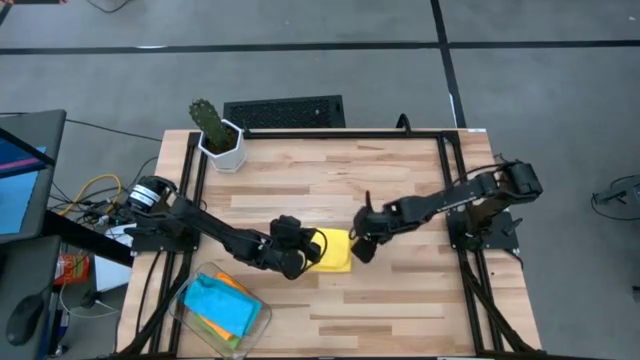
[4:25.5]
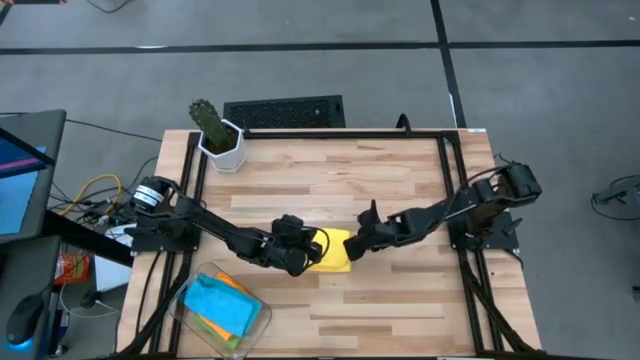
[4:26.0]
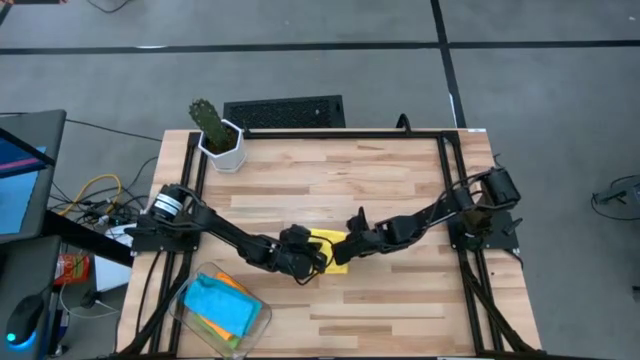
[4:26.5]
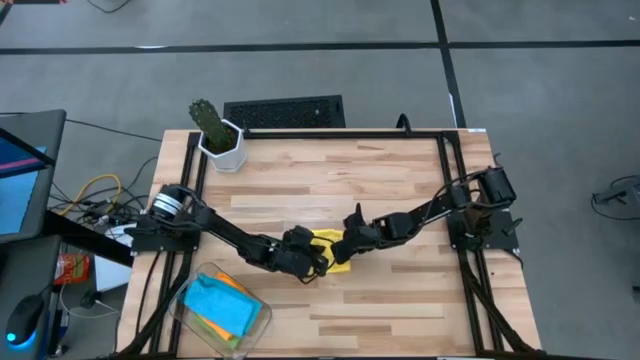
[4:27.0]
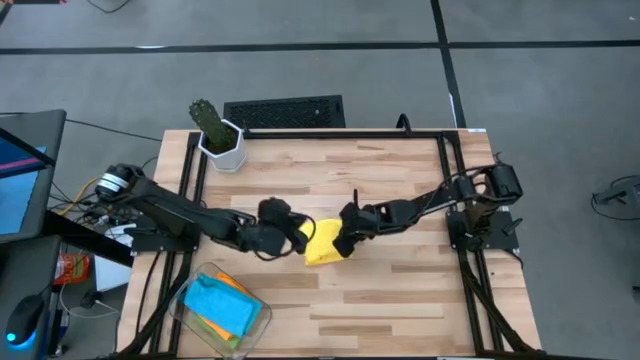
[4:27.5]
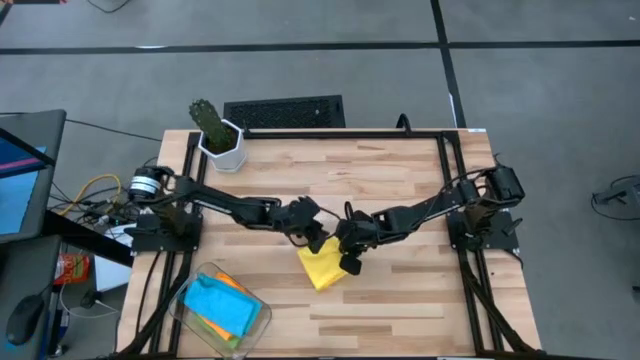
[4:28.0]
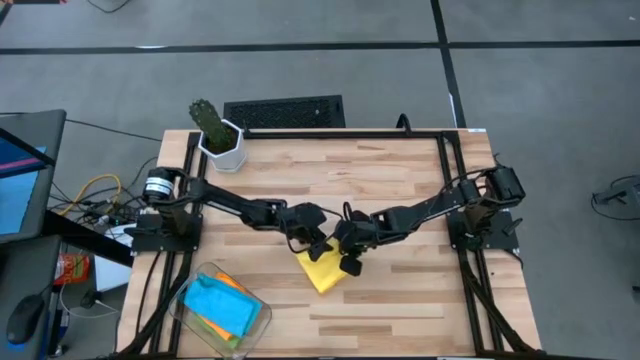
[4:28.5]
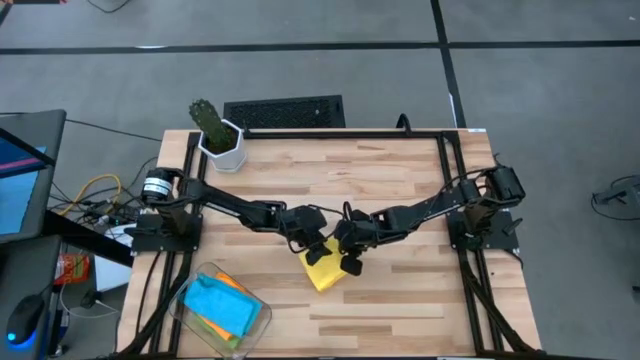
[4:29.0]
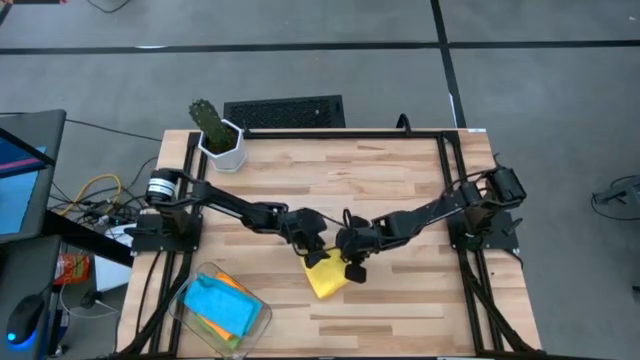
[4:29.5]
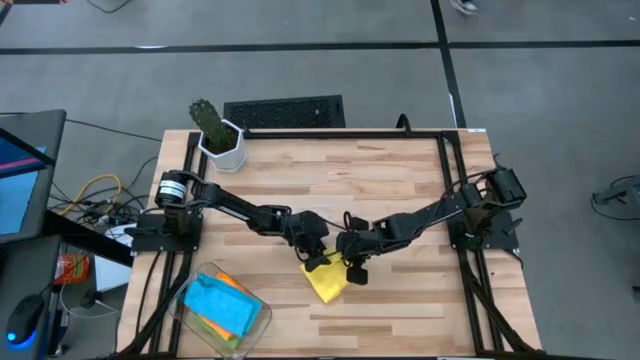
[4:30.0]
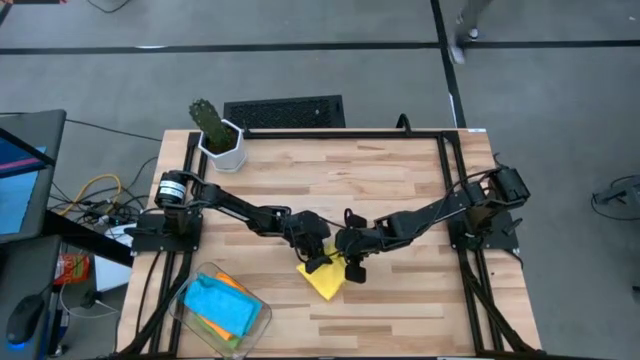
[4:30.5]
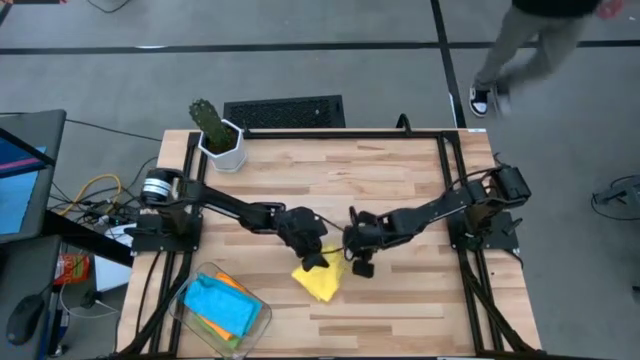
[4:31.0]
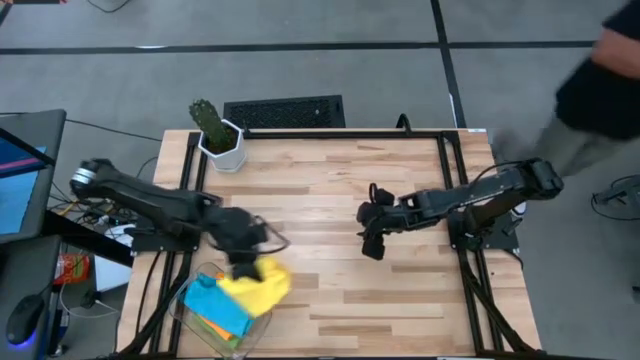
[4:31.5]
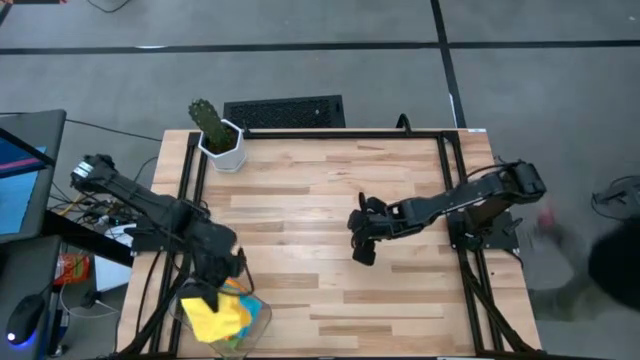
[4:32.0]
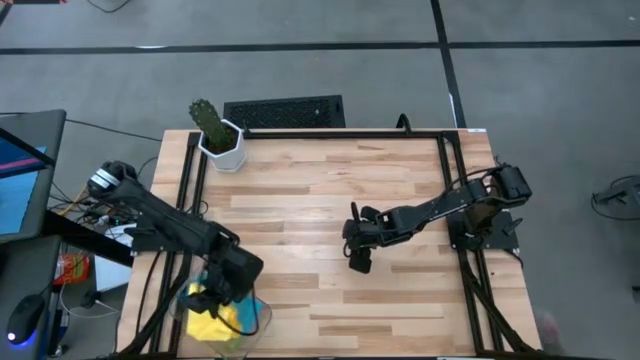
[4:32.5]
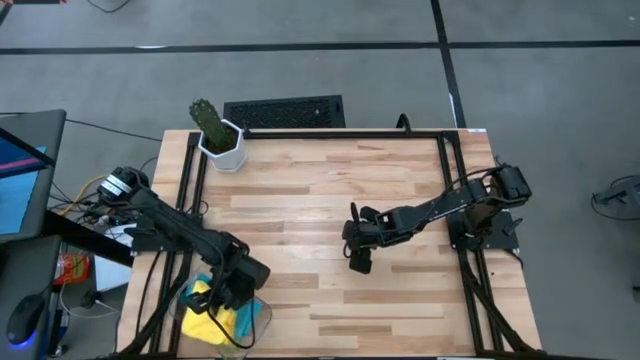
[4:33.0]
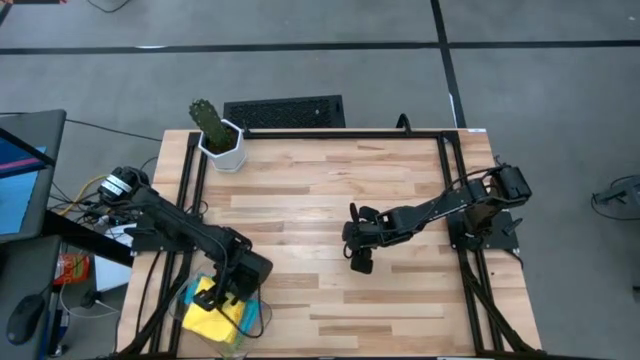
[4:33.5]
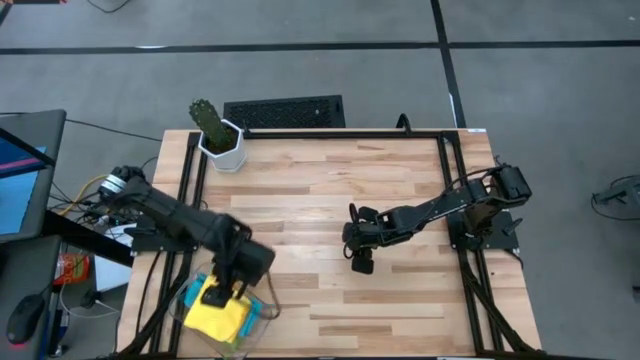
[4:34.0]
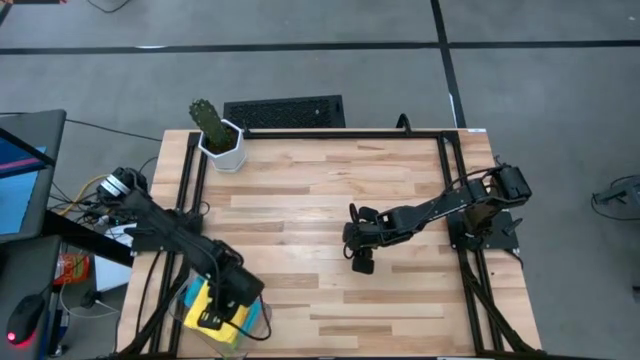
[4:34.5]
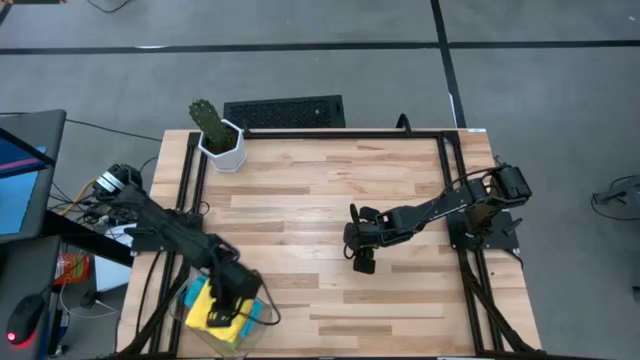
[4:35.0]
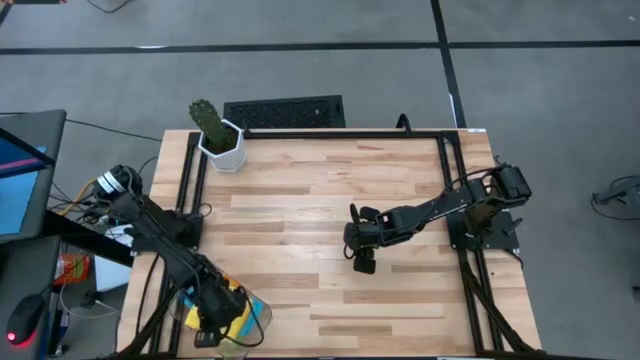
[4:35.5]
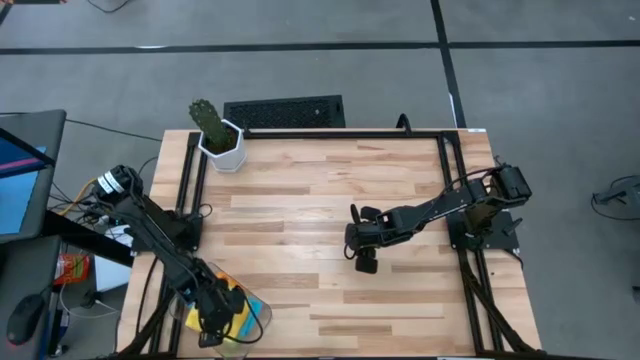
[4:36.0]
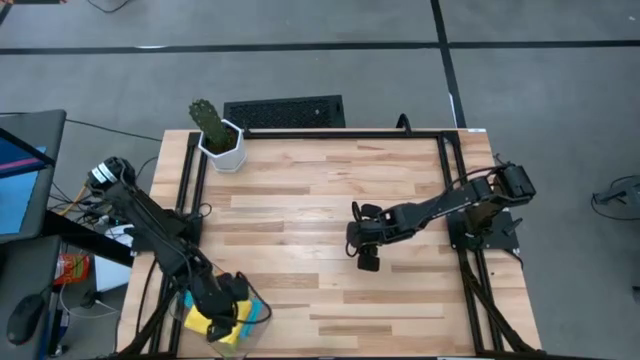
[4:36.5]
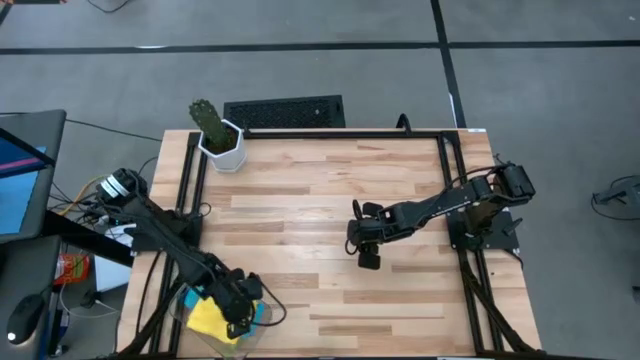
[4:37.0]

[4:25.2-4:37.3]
Task: Fold microfiber towels
Put the yellow microfiber towel into the transparent bin

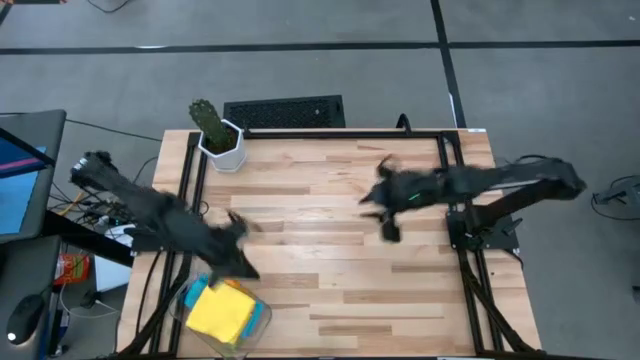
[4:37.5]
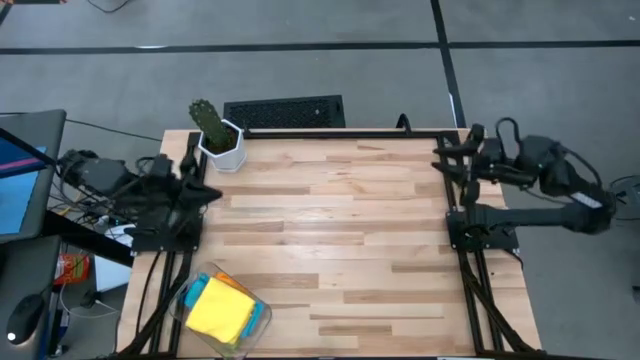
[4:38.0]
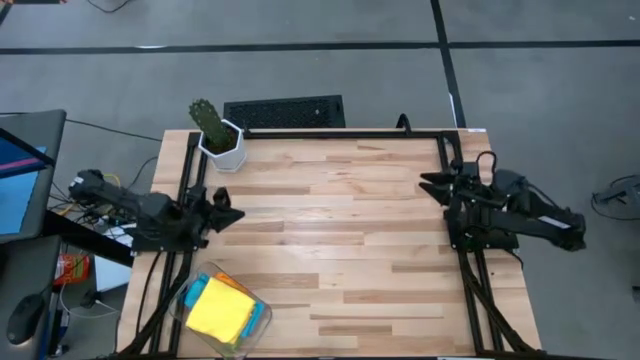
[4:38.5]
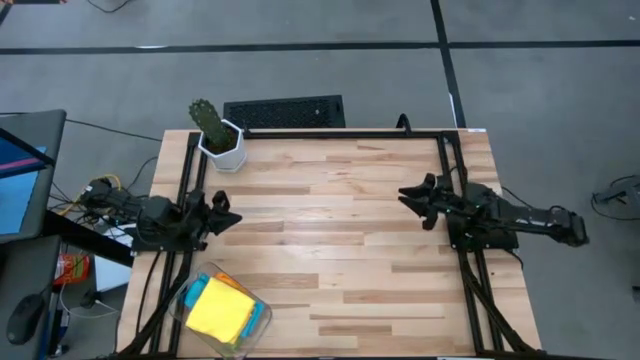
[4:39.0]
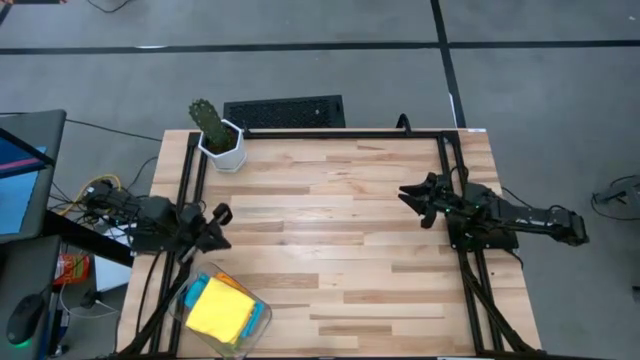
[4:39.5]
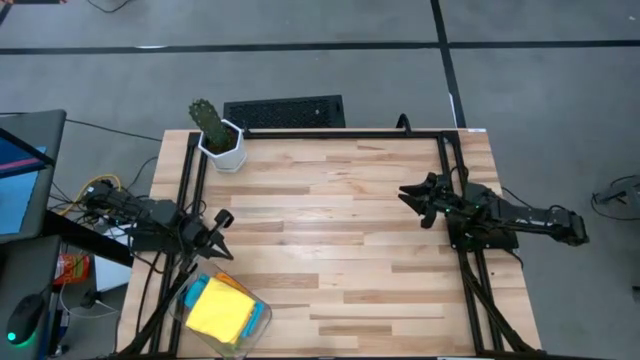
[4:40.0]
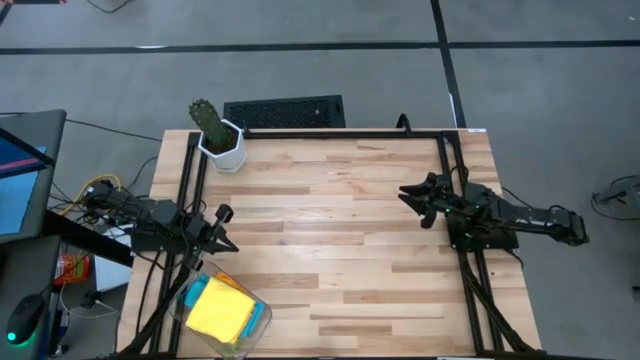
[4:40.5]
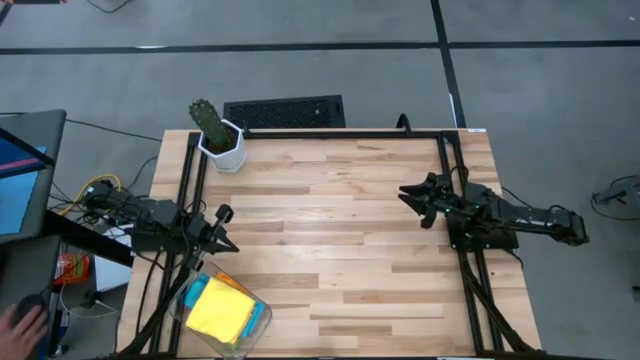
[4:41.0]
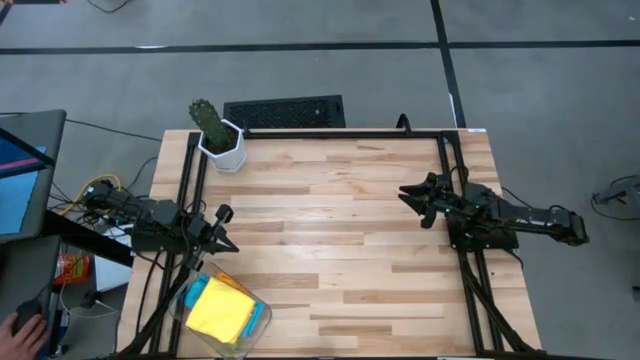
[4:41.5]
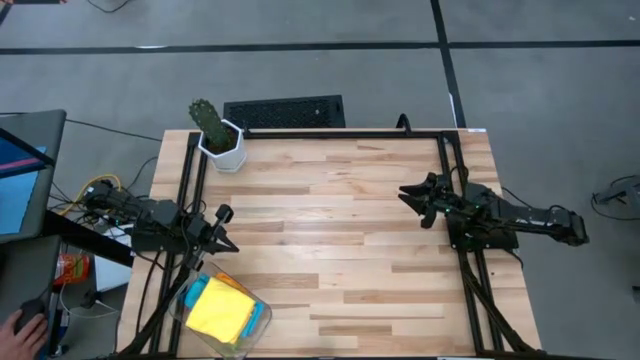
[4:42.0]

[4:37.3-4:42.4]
Return to Home Position

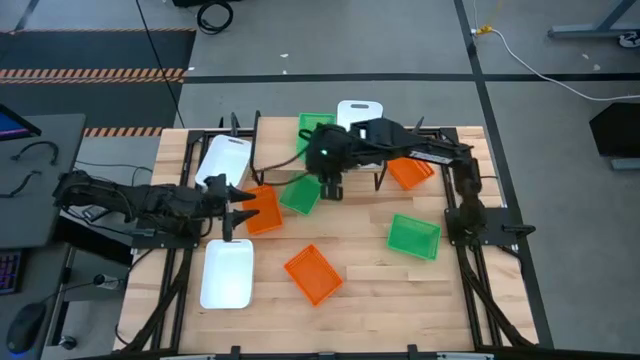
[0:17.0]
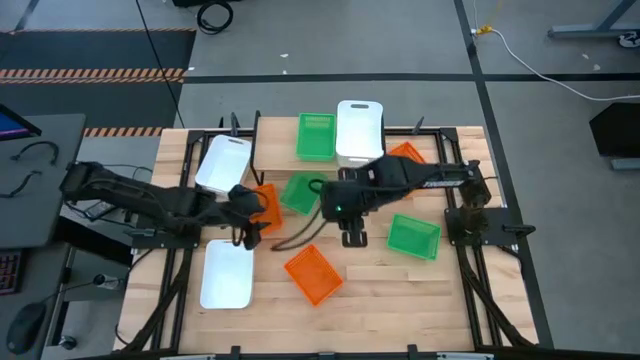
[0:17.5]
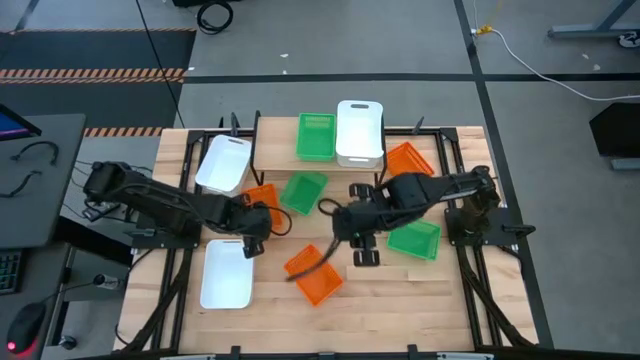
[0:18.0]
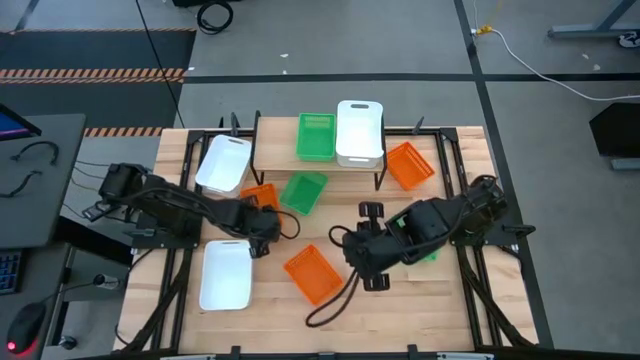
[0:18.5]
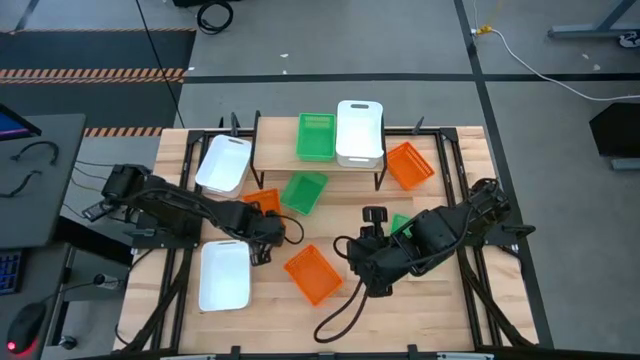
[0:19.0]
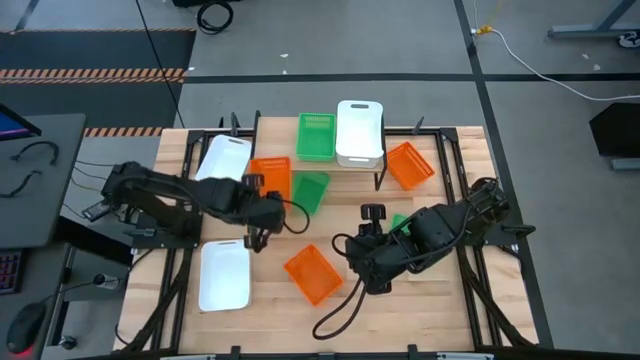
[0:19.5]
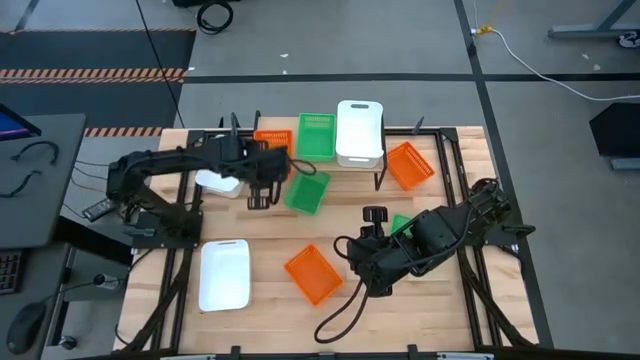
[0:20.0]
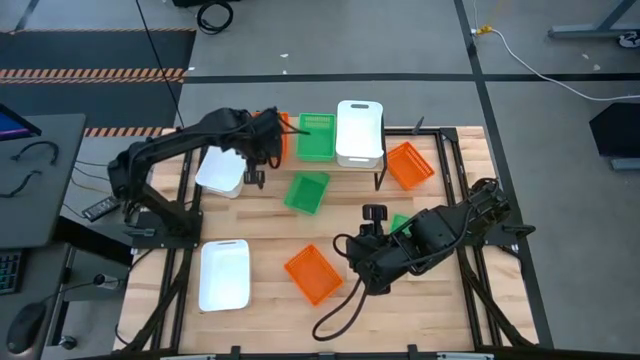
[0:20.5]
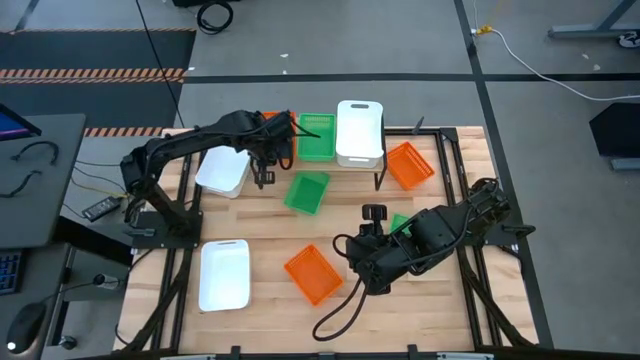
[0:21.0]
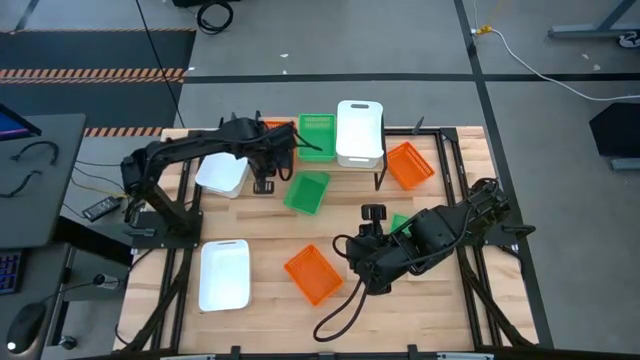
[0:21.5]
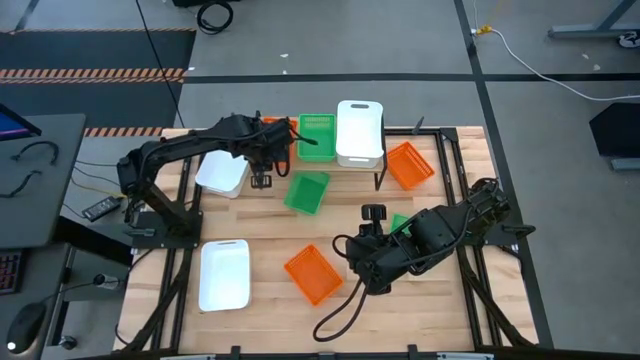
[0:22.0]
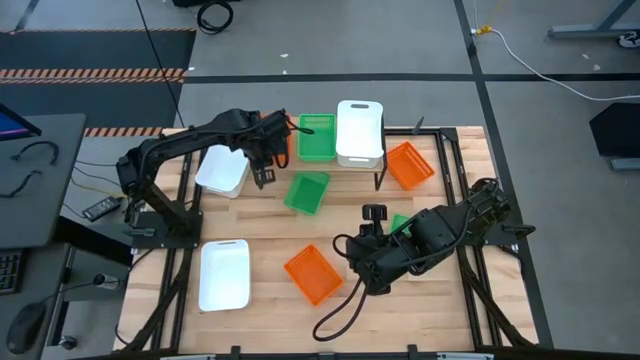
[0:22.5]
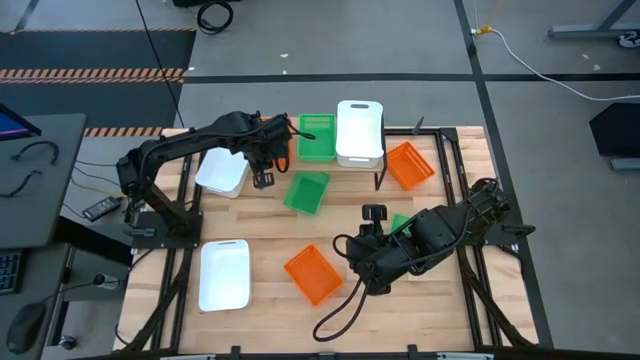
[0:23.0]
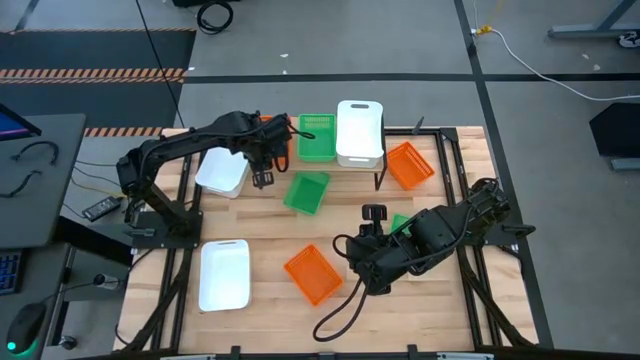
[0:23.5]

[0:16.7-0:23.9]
Task: Stack baskets on shelf by color
Put the left orange bin on the shelf
